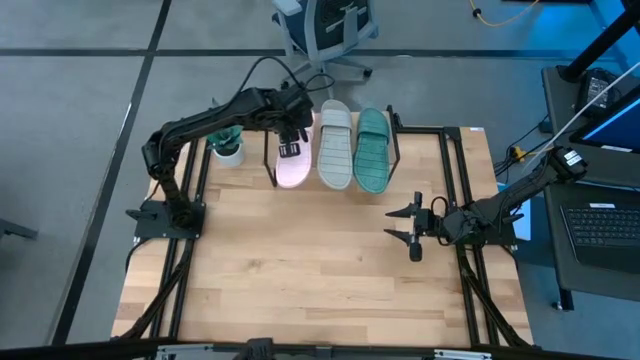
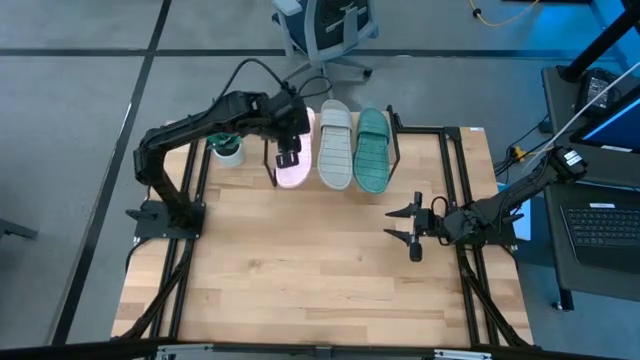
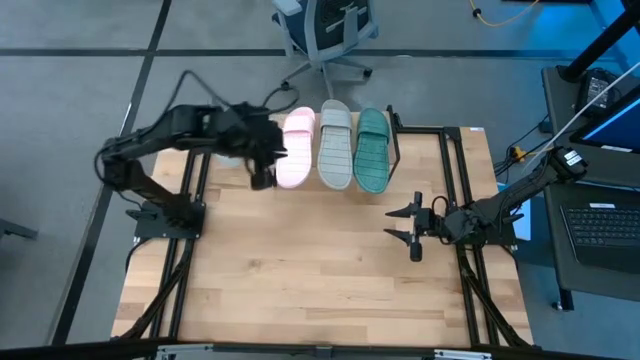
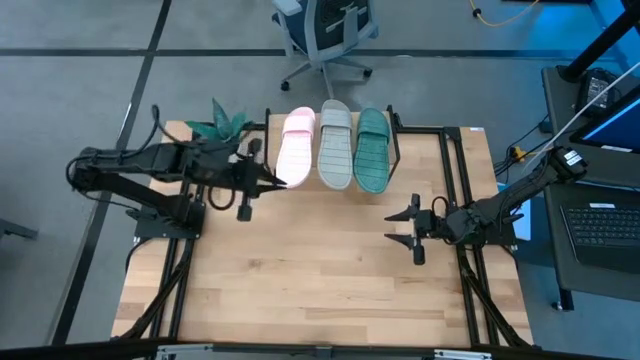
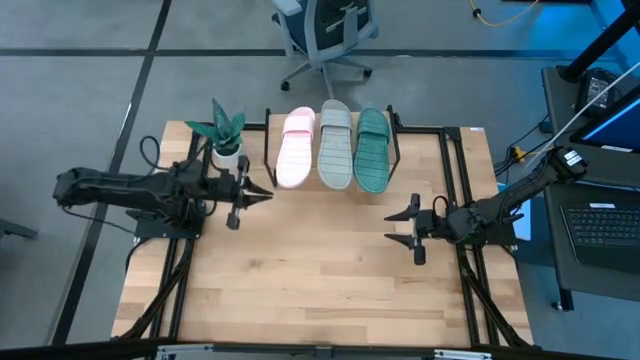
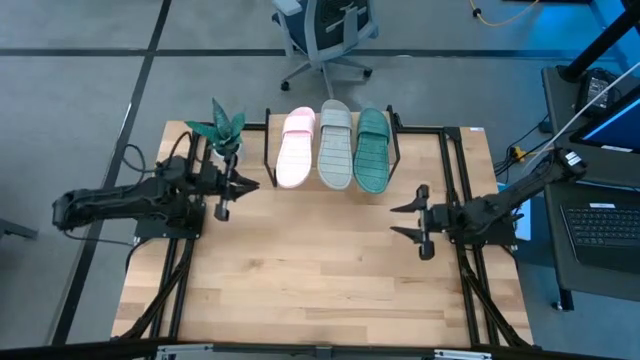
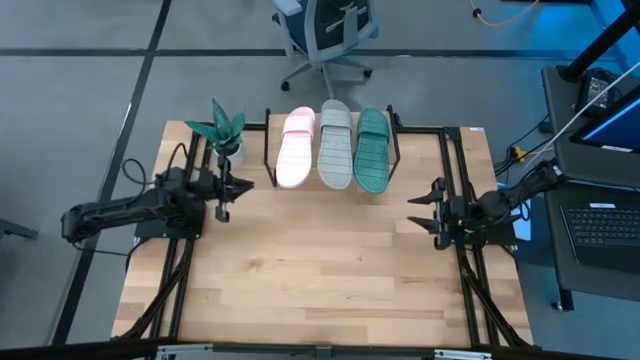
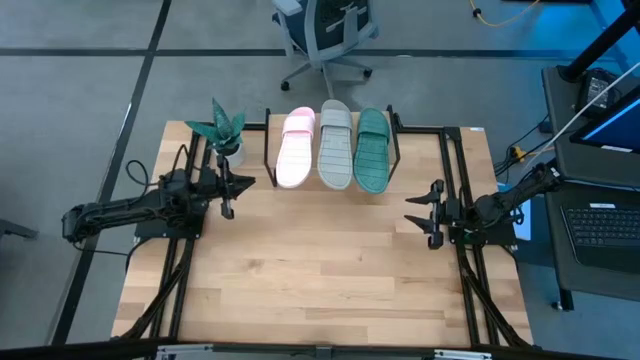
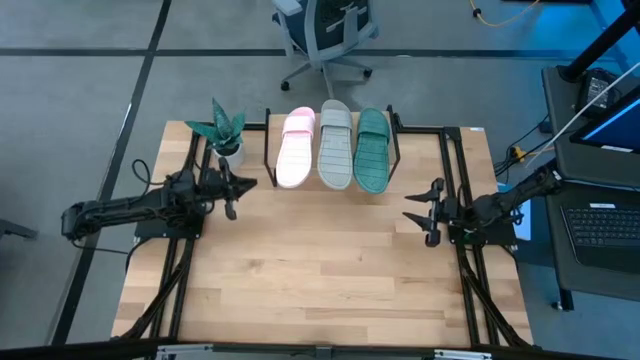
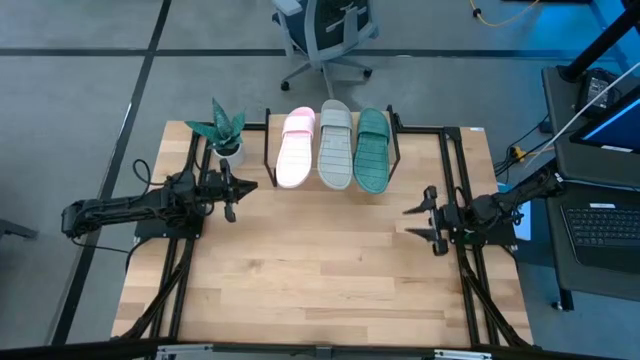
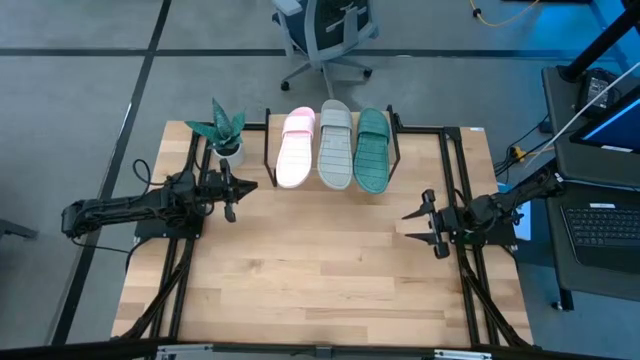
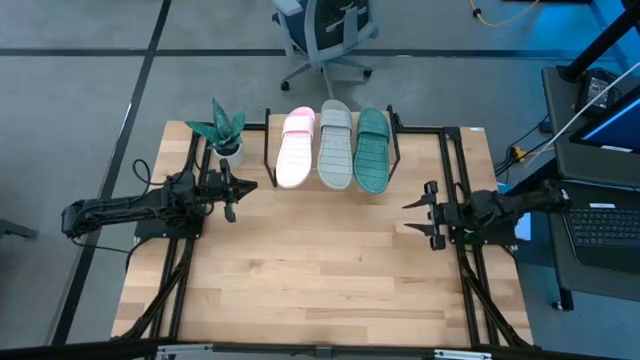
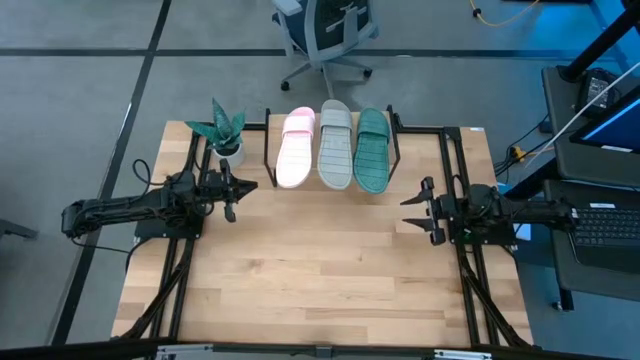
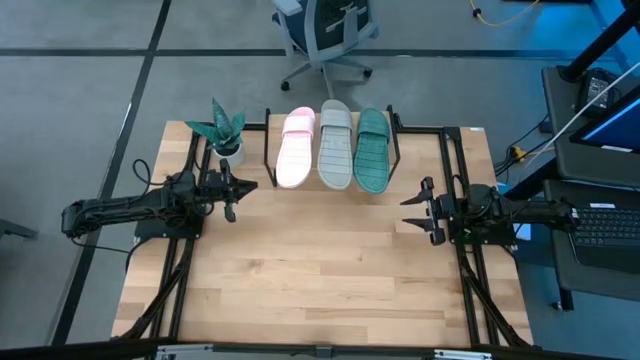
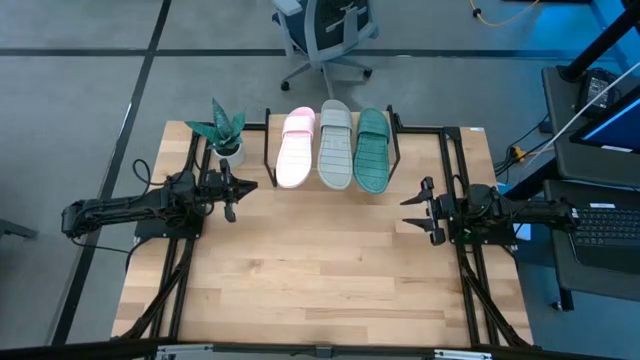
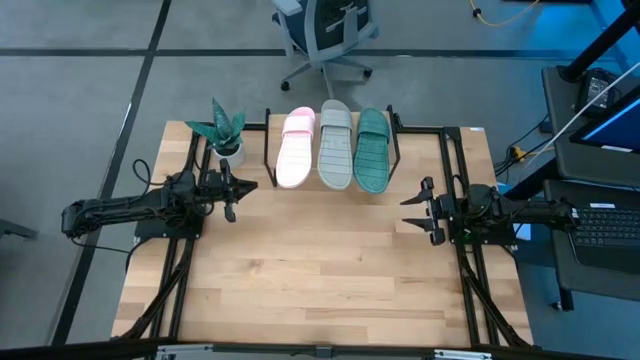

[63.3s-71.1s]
Task: Pick and place slides into the shelf
Return to Home Position

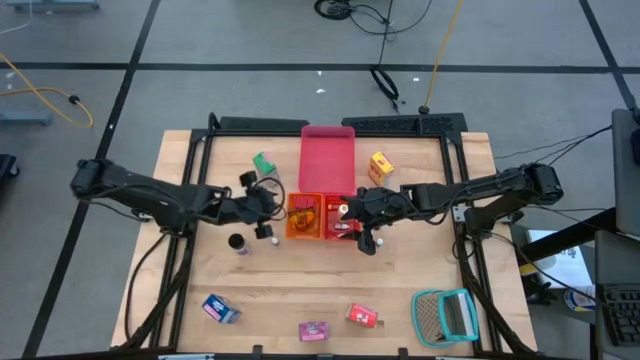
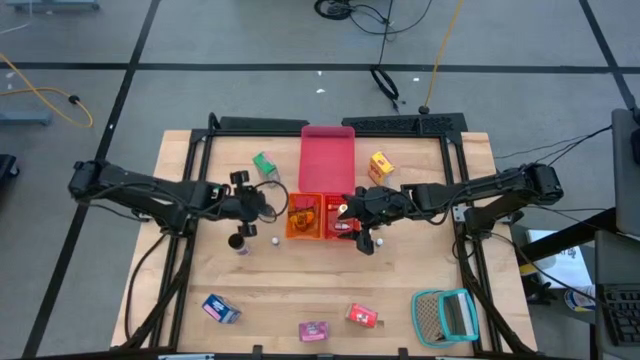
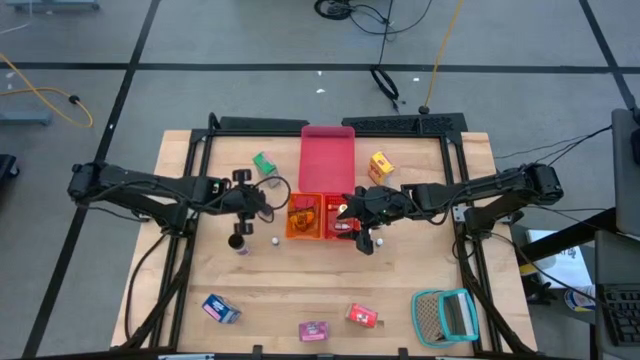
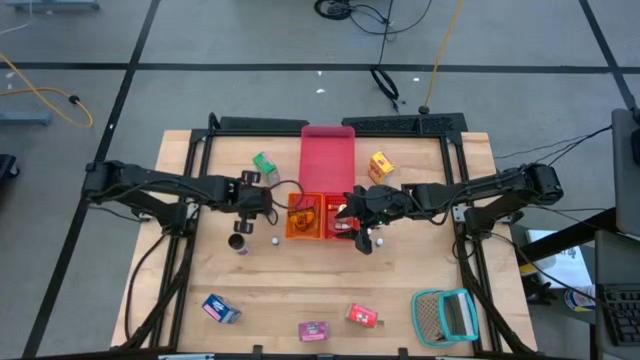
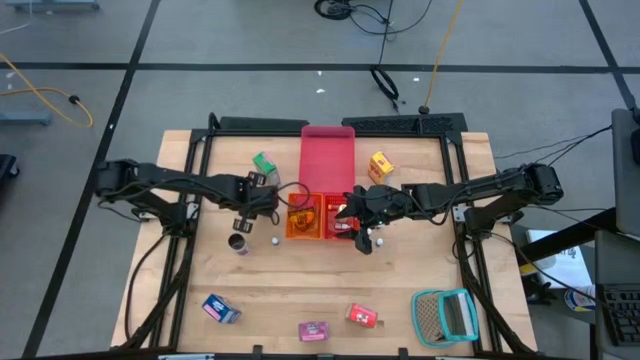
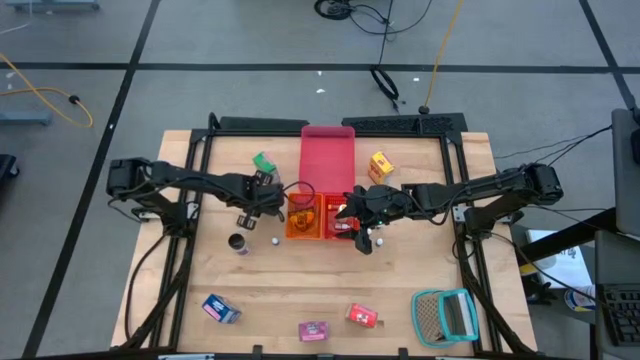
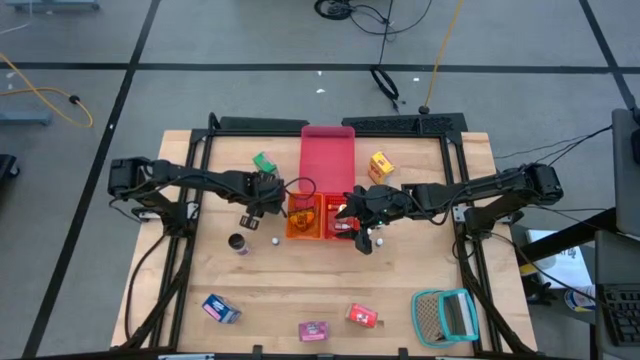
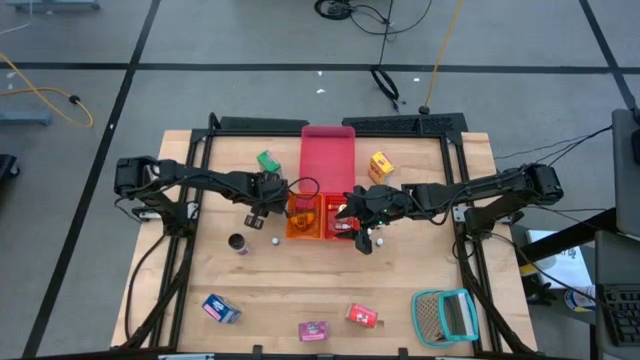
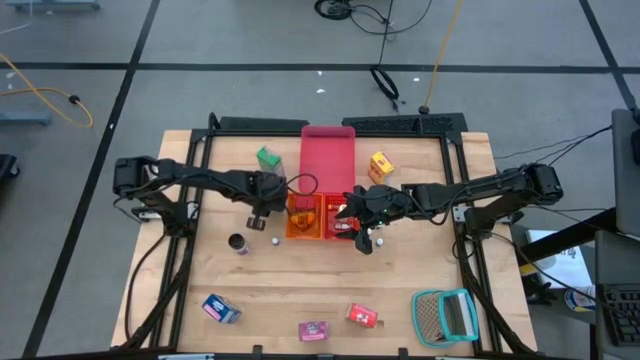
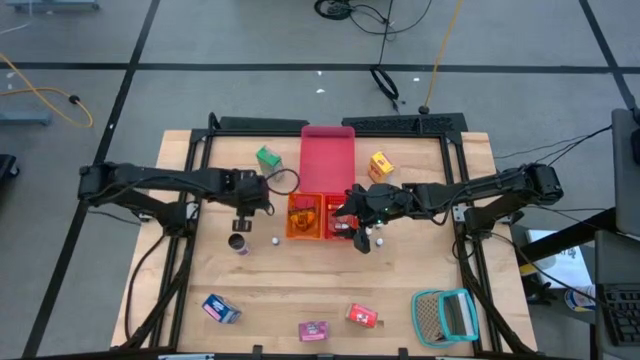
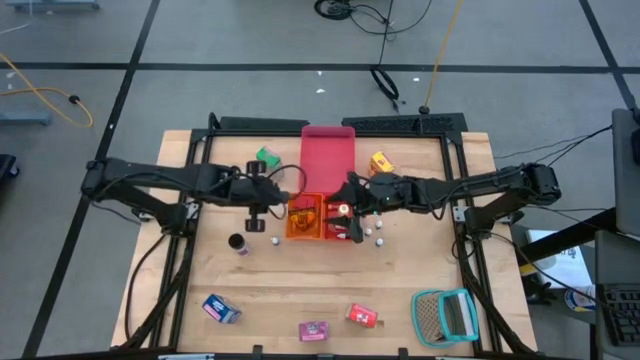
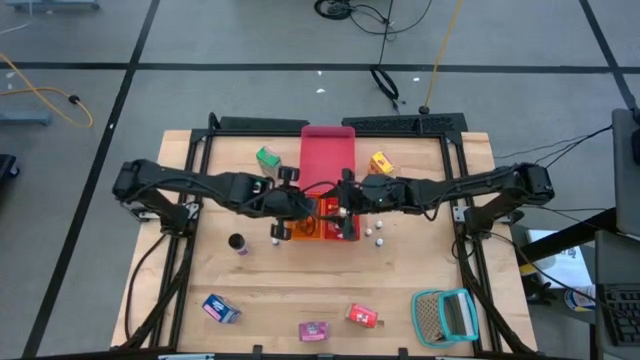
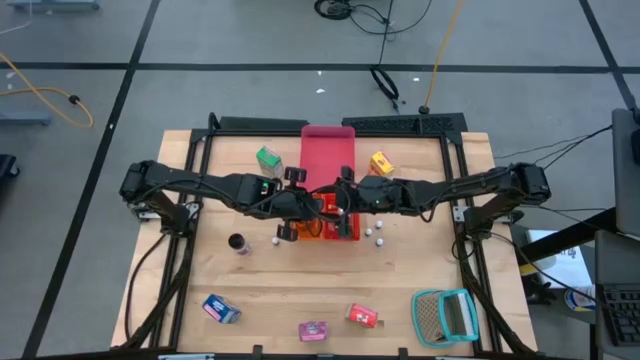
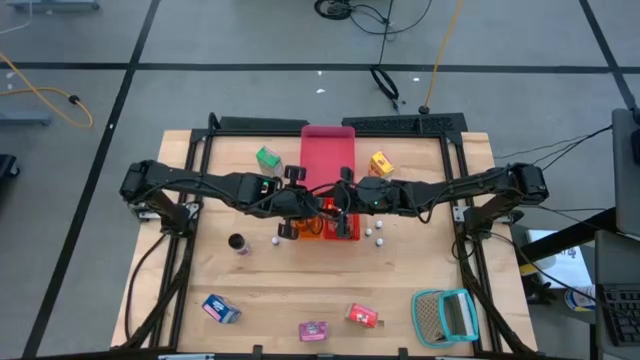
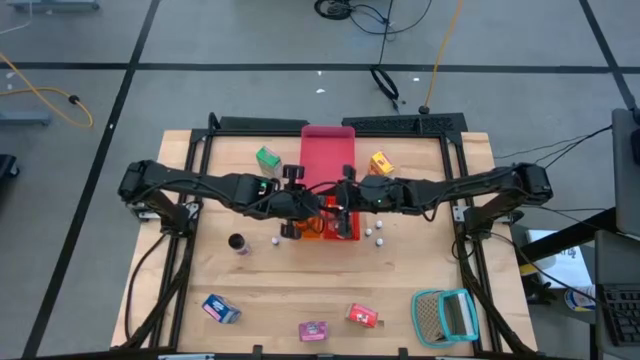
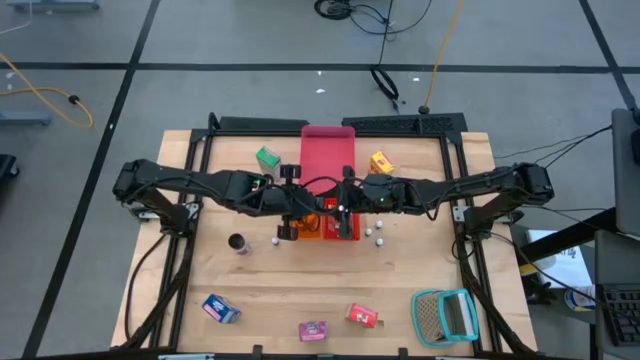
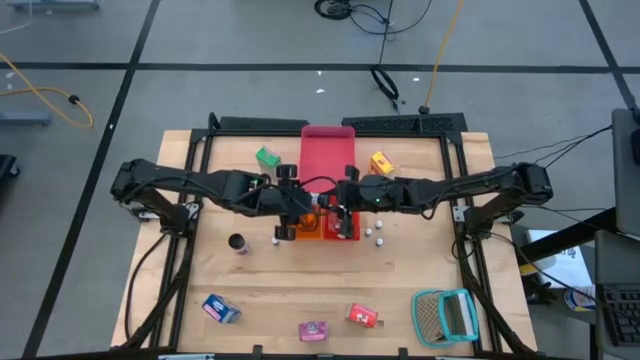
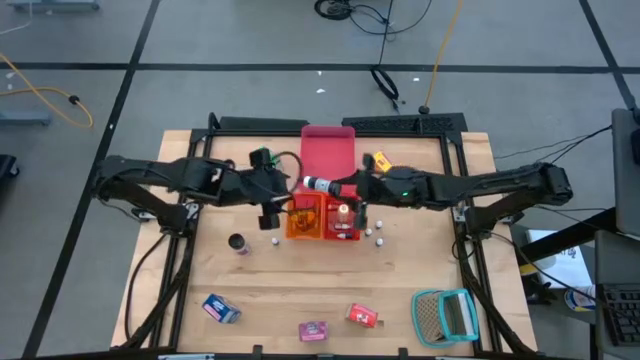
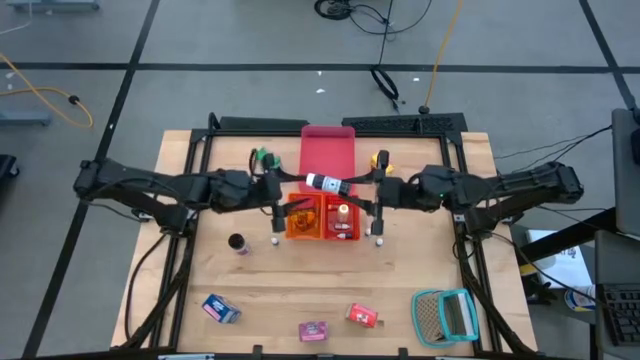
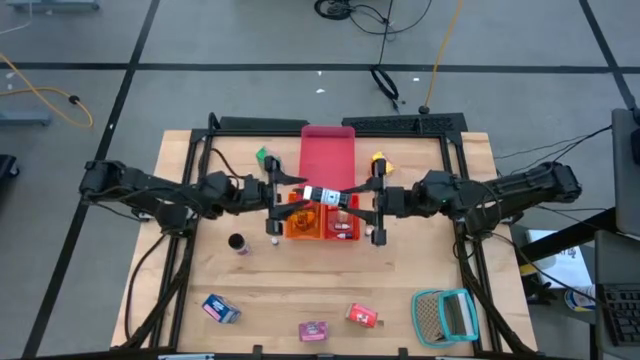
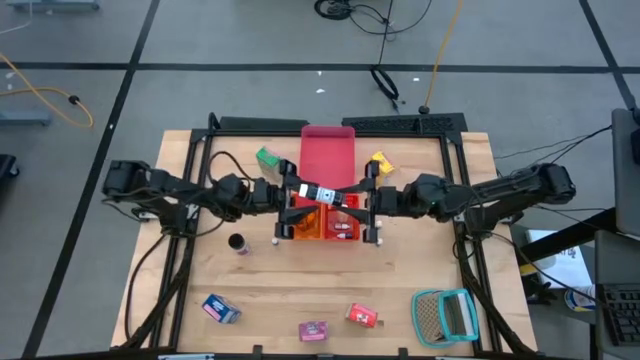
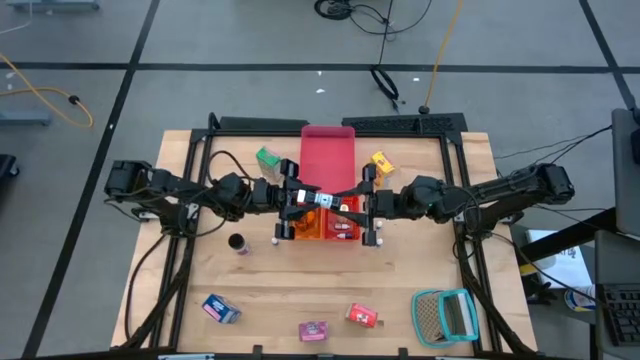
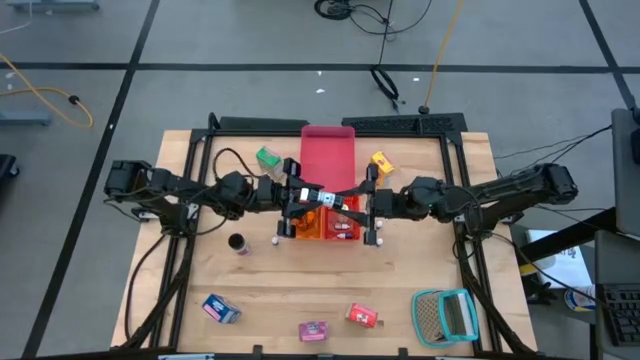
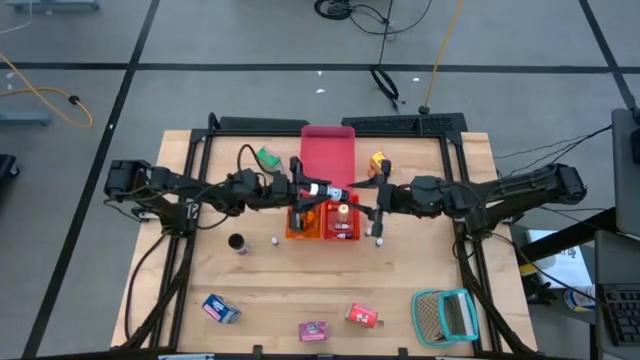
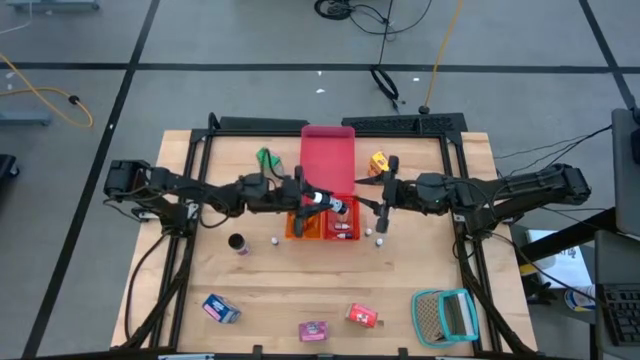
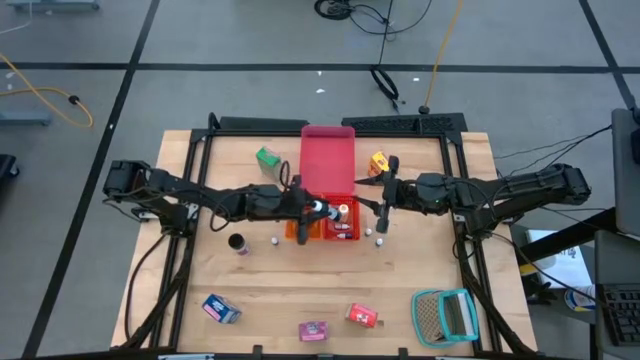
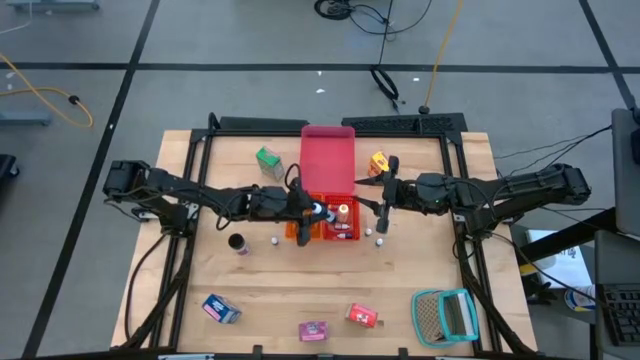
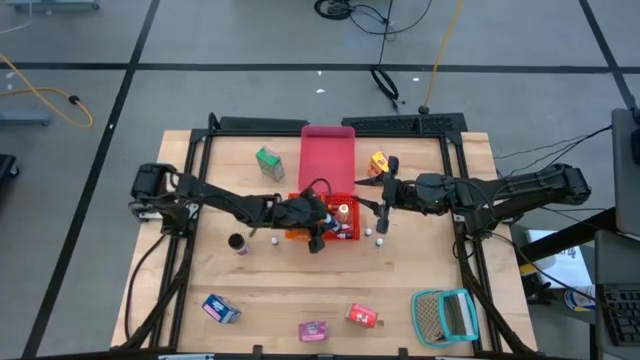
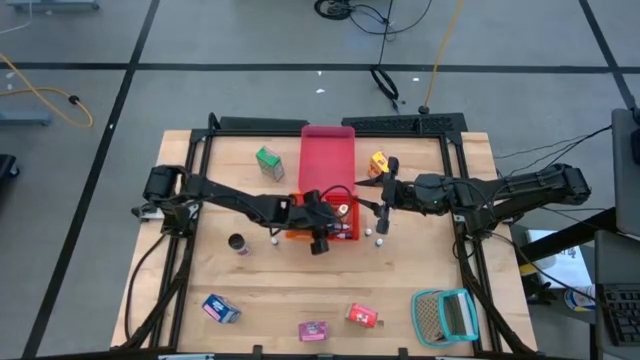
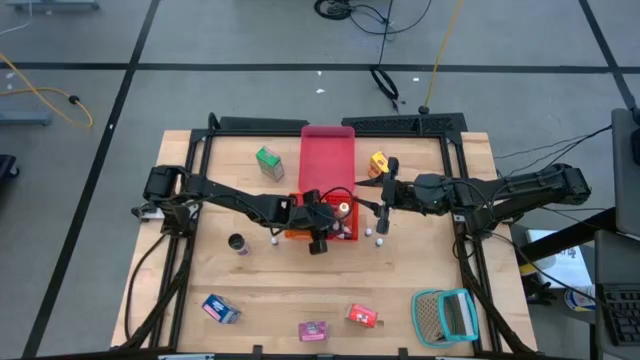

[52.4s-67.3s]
Task: Pick & Place Kitchen Items
Put the large black food coloring bottle into the red basket
